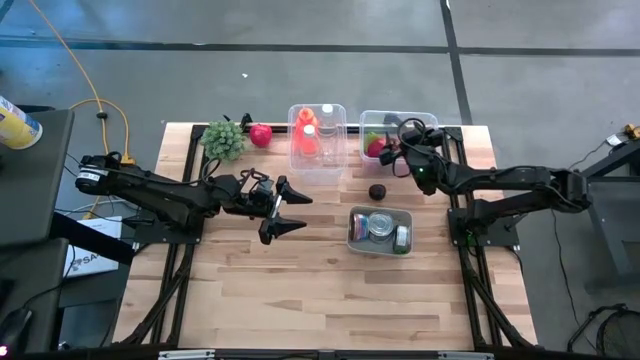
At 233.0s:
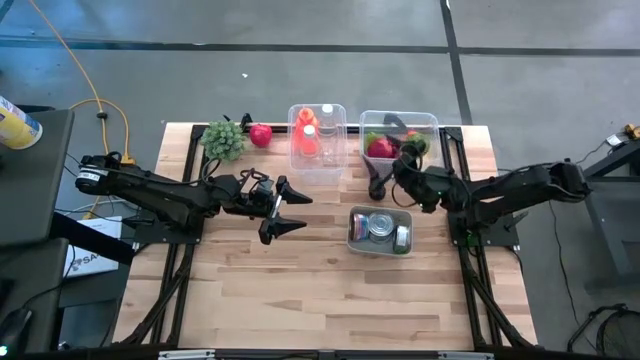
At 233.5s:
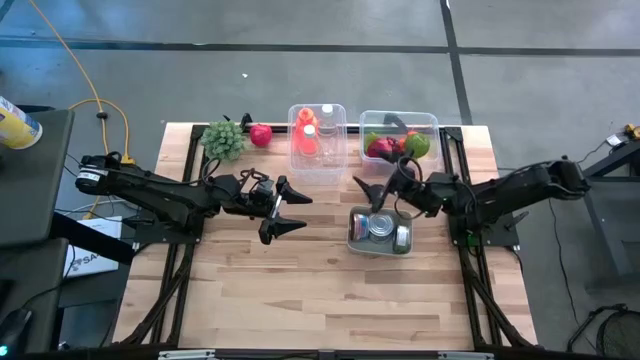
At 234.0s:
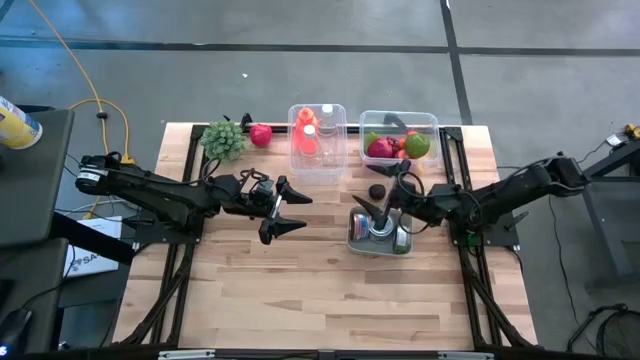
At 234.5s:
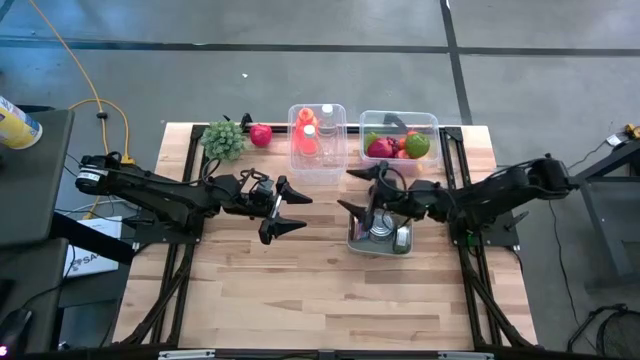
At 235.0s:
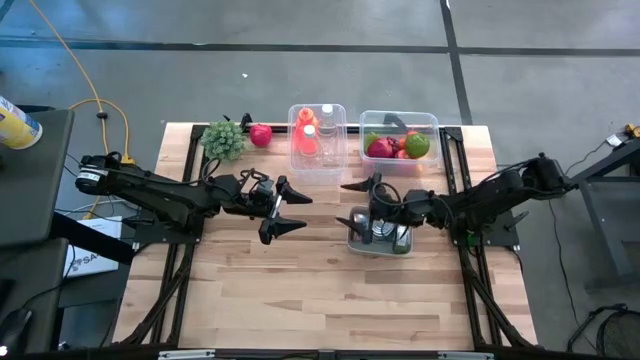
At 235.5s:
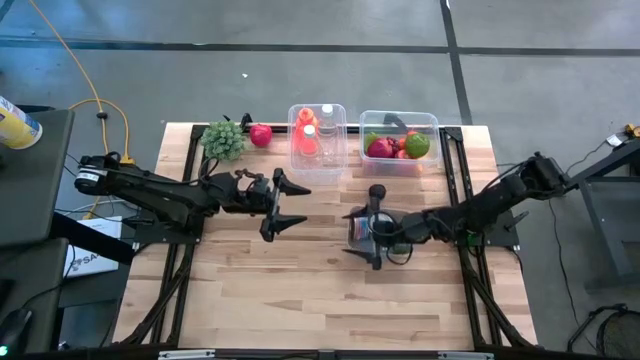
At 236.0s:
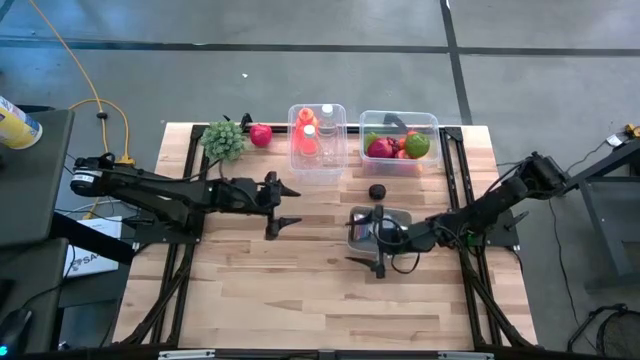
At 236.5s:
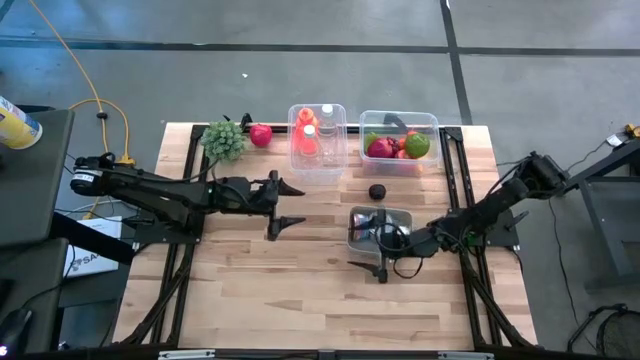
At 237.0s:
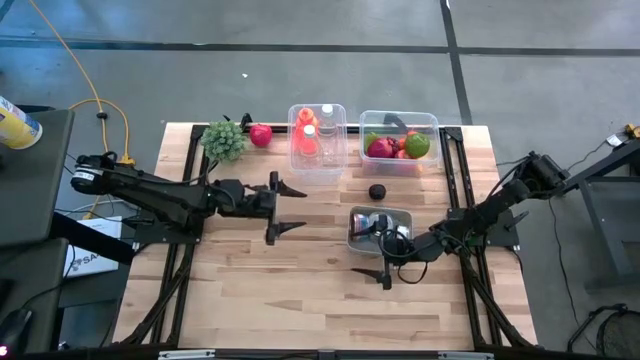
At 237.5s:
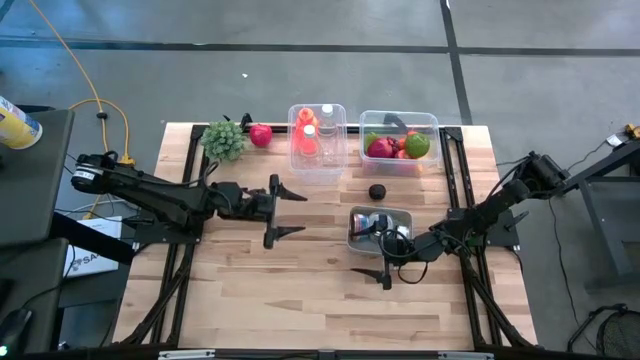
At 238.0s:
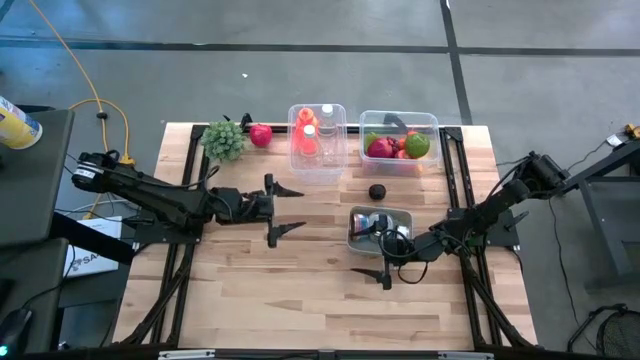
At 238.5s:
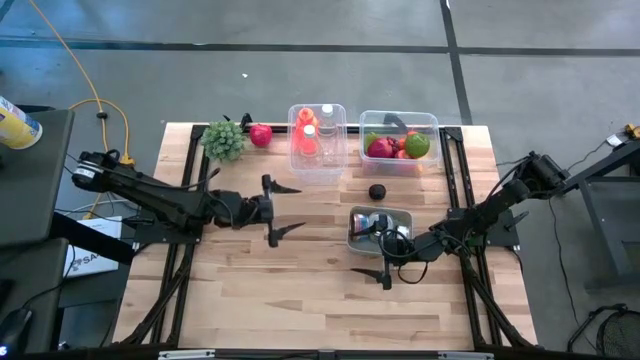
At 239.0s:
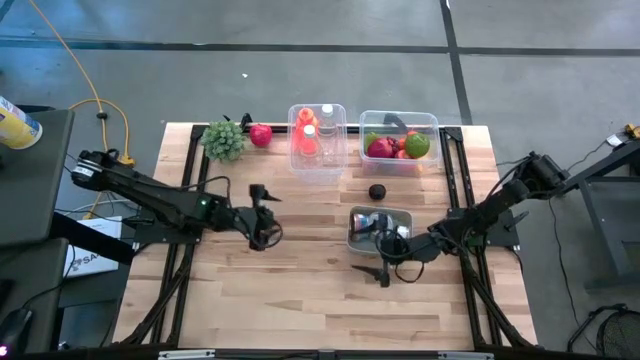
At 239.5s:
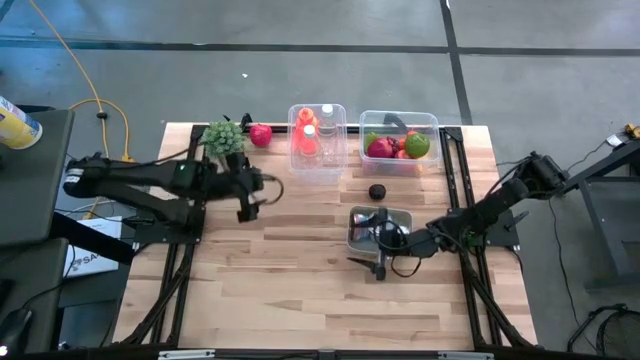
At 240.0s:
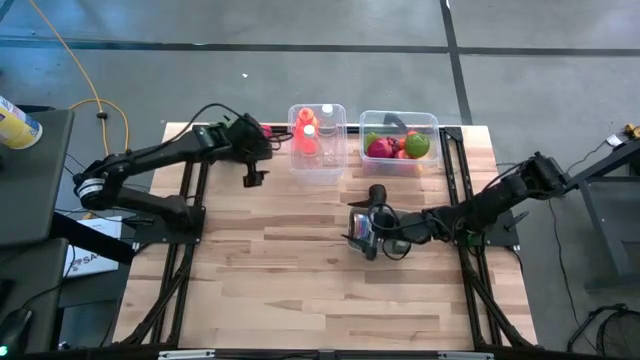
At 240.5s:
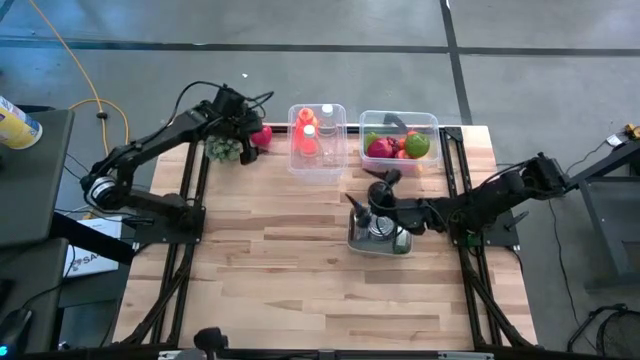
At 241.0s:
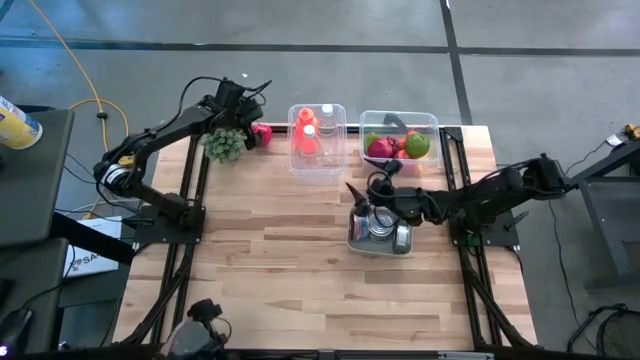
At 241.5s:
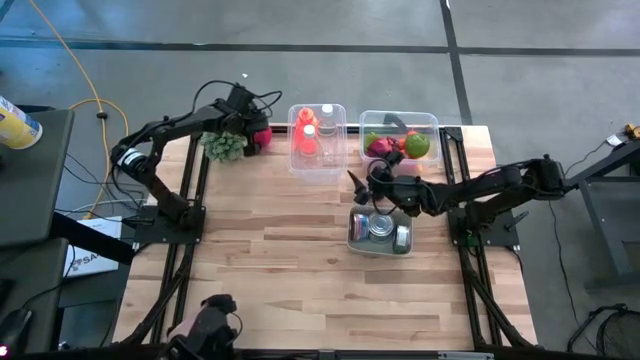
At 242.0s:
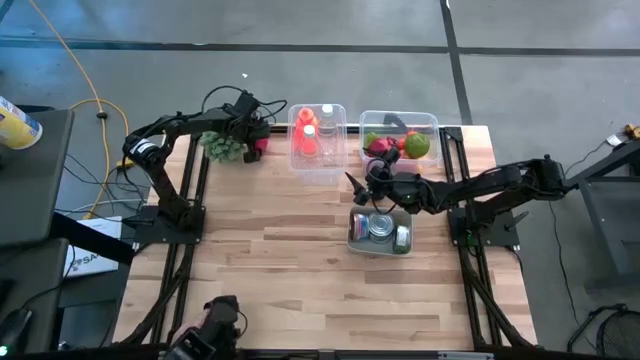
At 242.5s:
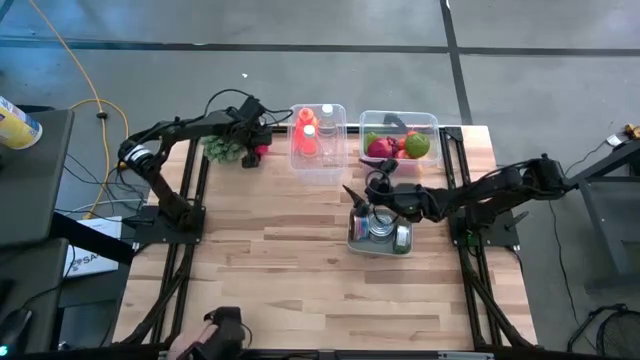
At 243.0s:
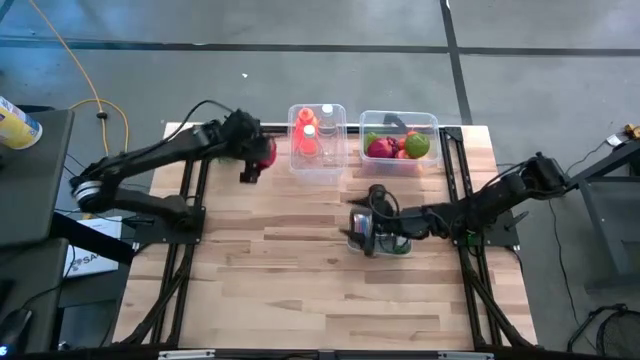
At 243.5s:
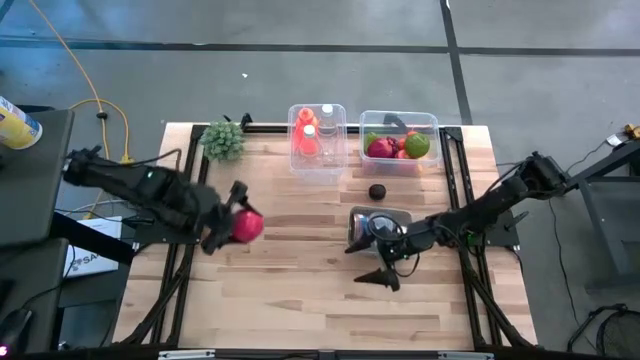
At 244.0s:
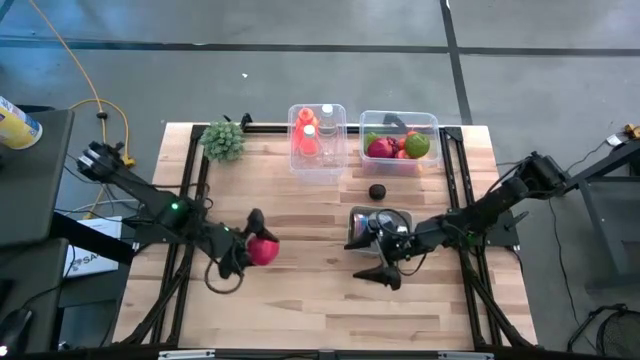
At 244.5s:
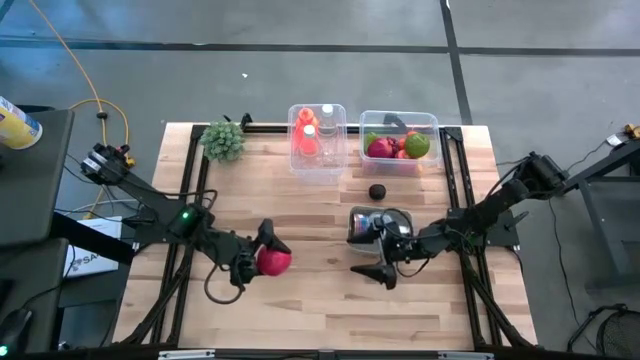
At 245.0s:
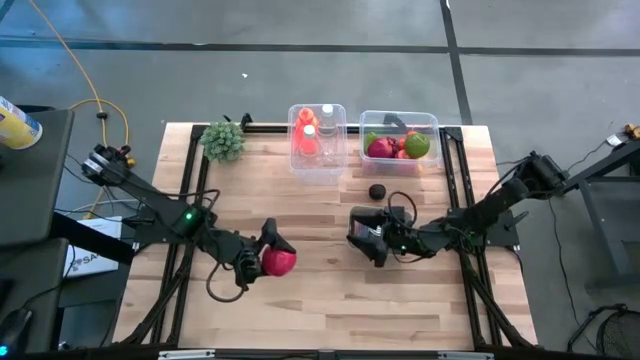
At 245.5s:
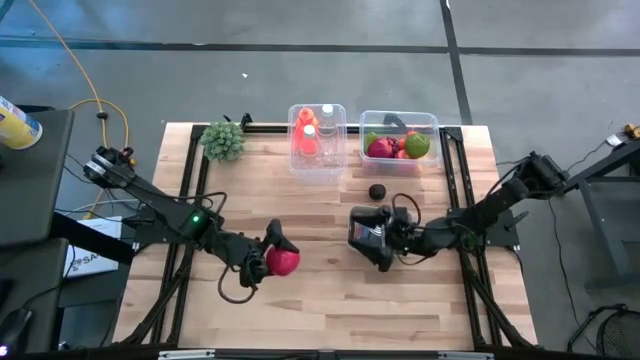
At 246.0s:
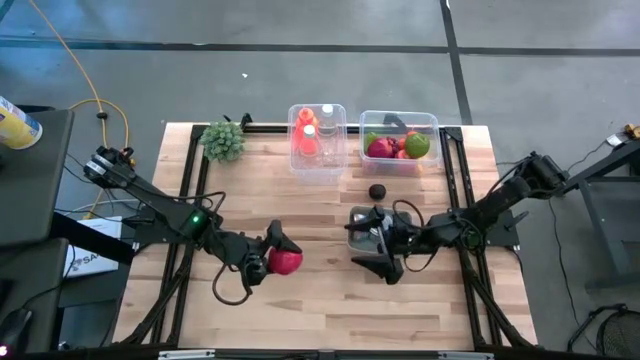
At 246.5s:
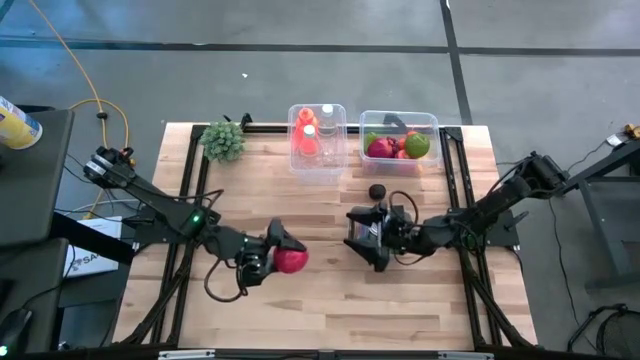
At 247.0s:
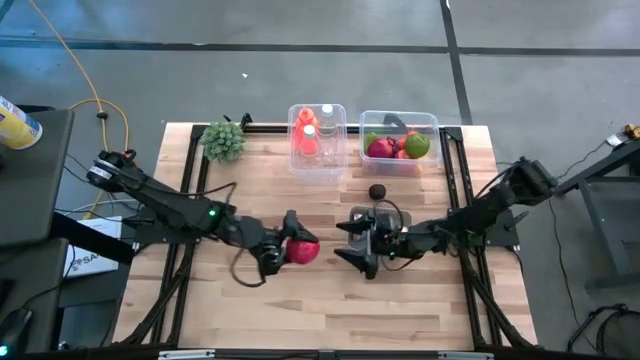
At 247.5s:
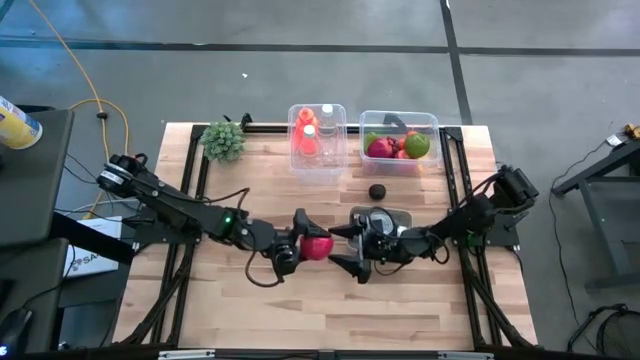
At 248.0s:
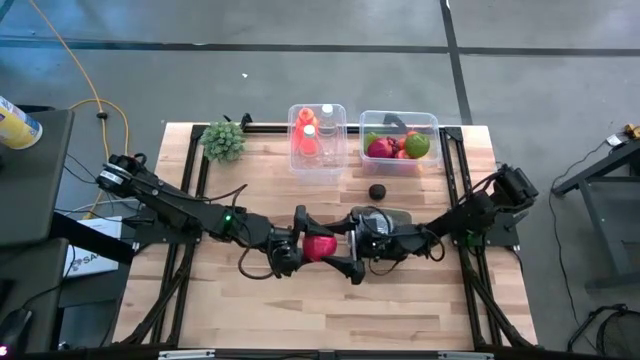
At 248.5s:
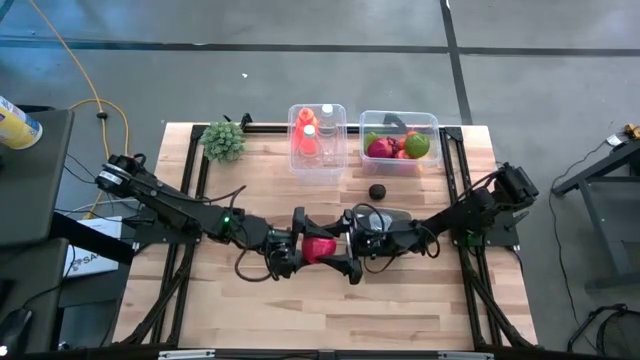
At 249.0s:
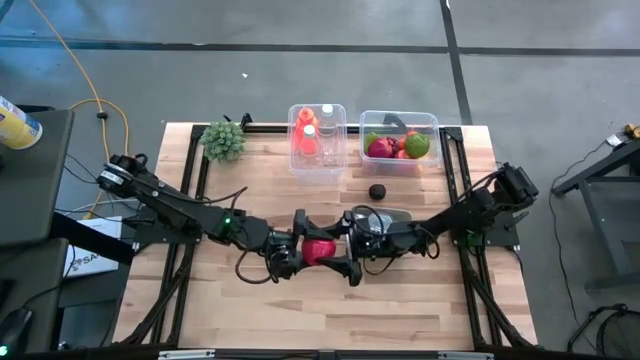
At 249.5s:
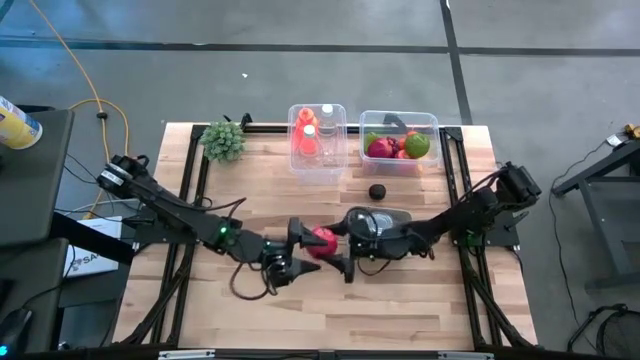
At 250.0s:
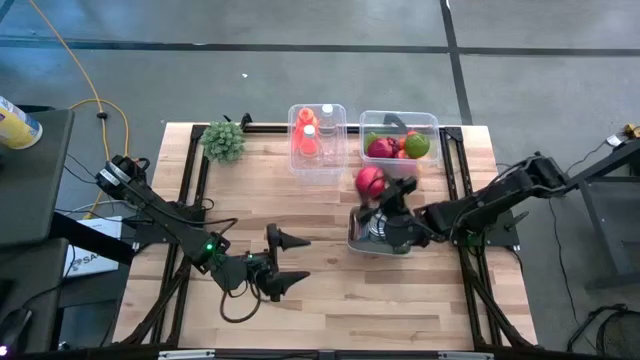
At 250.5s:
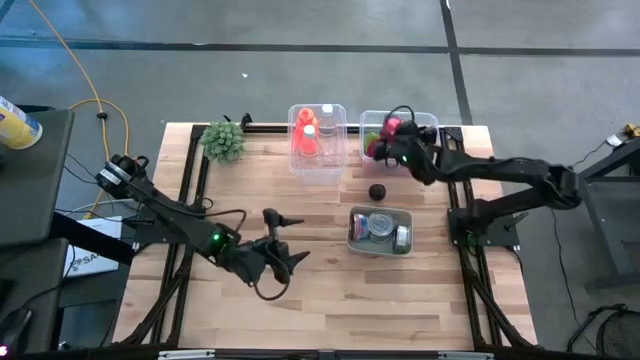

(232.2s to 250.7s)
Task: Pick & Place Food Item
Put the red apple into the right transparent bin

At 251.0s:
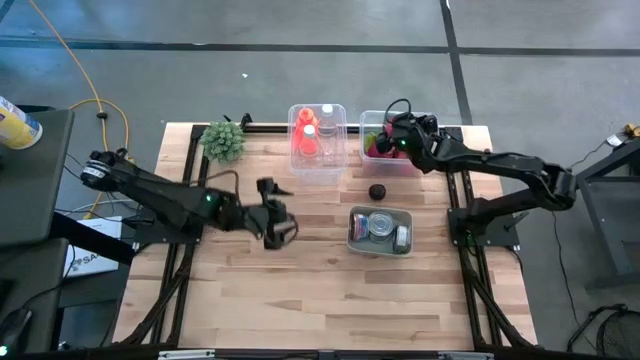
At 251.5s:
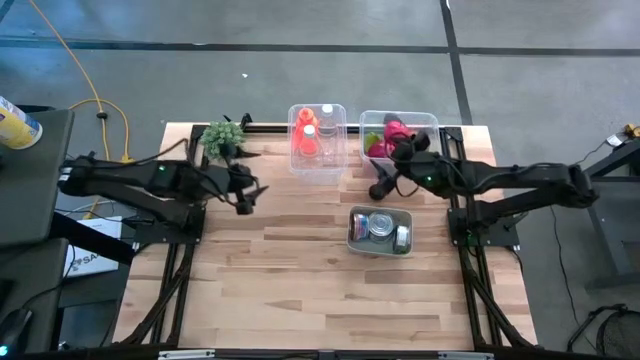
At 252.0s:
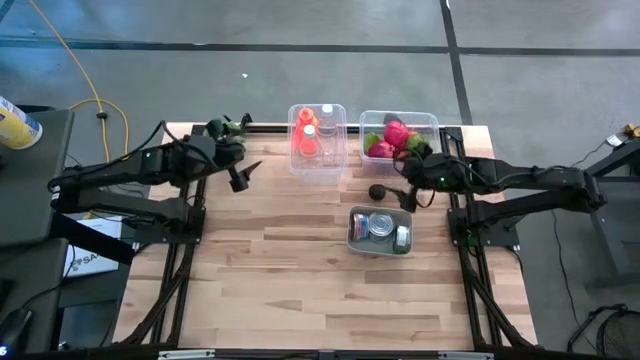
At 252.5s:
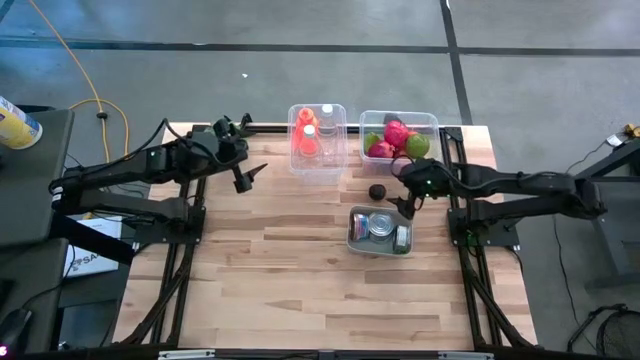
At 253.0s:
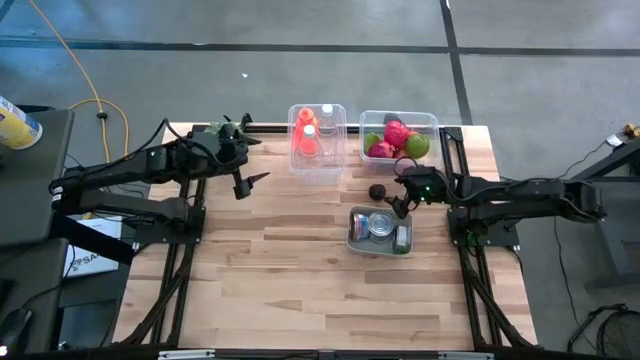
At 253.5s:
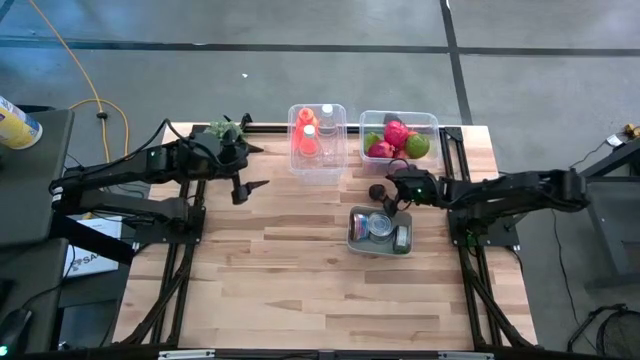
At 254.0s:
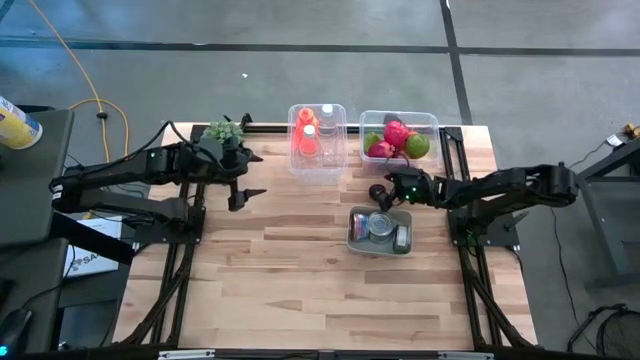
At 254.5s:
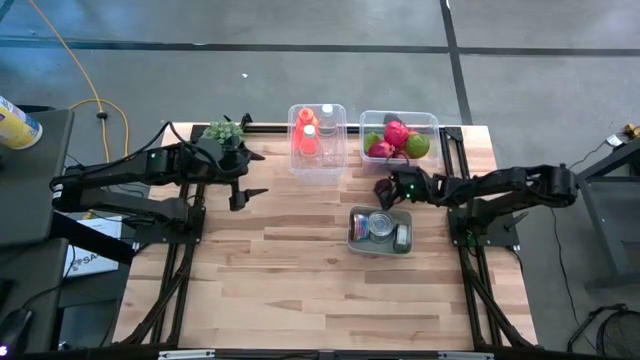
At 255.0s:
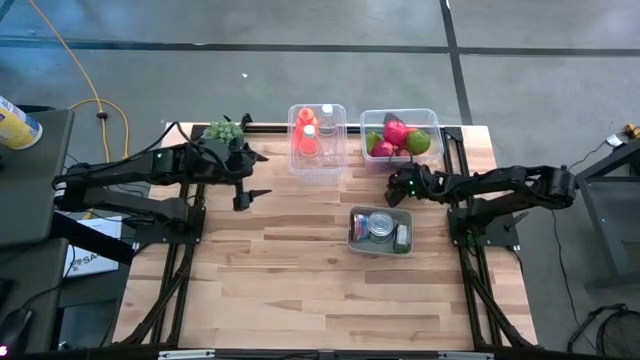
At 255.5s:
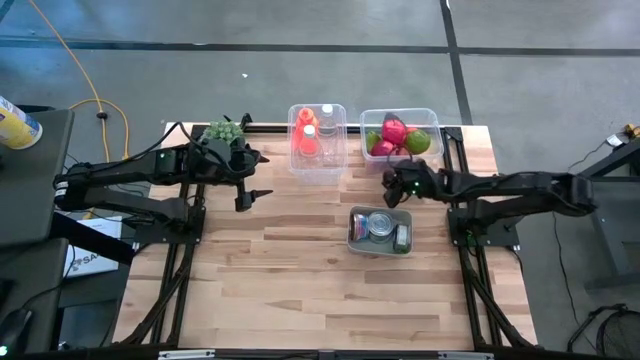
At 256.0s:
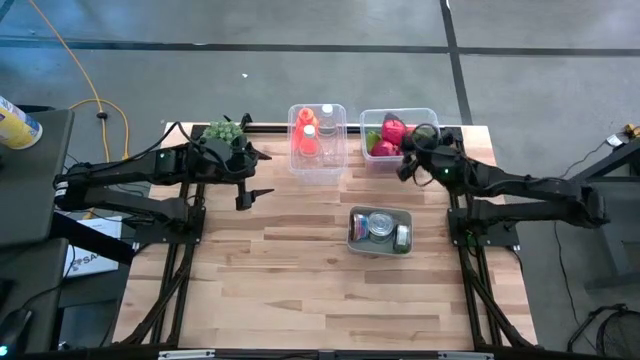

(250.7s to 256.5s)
Put the plum into the right transparent bin
